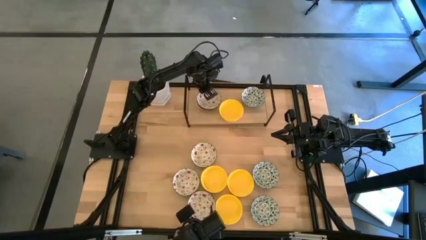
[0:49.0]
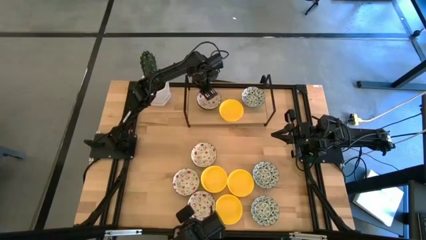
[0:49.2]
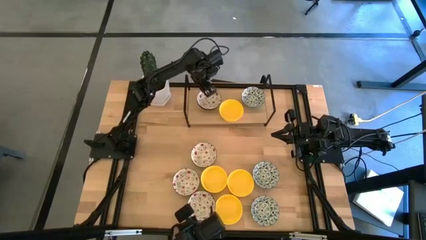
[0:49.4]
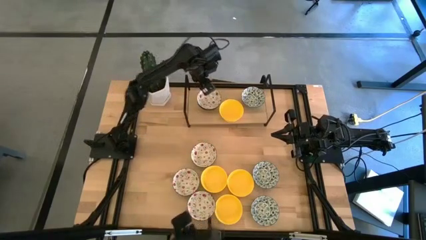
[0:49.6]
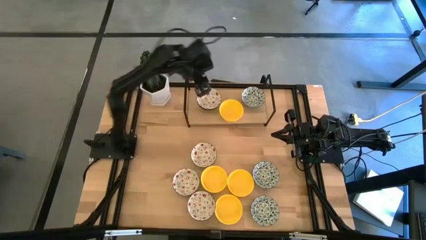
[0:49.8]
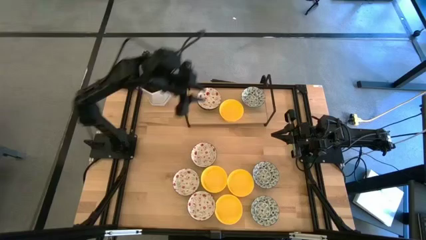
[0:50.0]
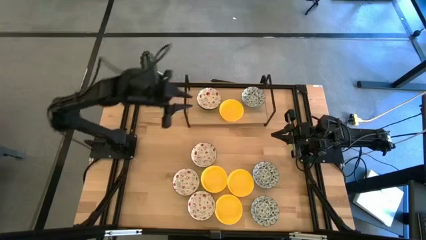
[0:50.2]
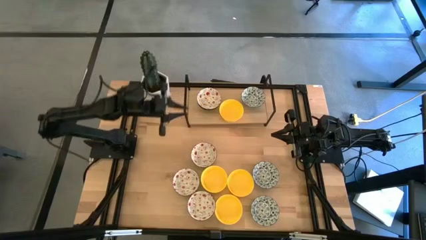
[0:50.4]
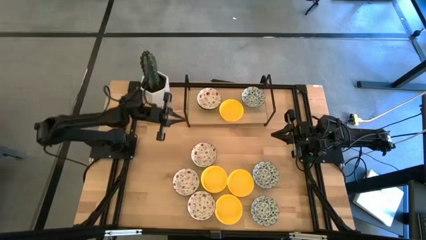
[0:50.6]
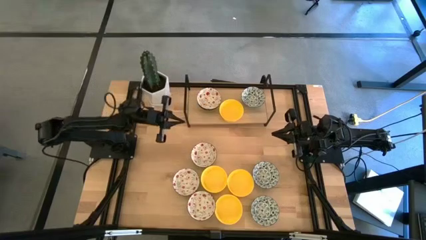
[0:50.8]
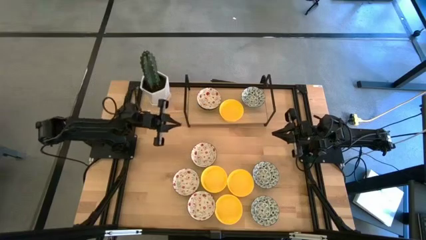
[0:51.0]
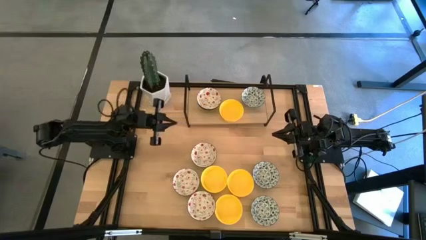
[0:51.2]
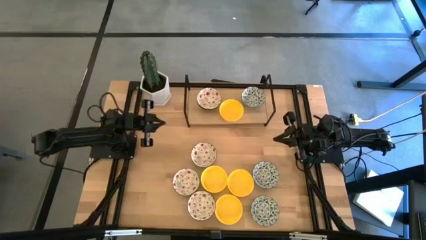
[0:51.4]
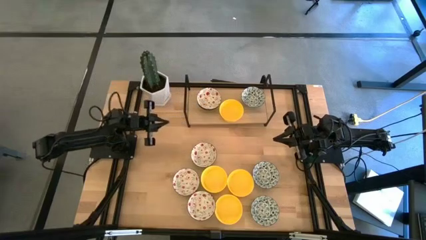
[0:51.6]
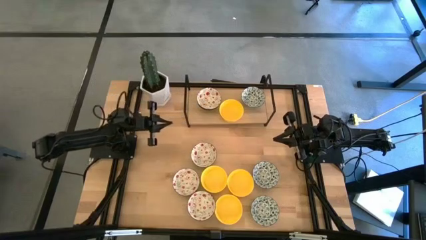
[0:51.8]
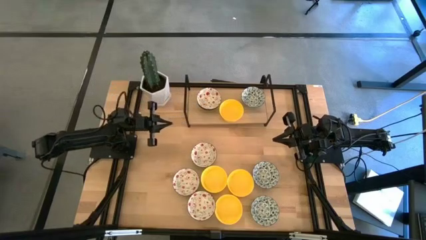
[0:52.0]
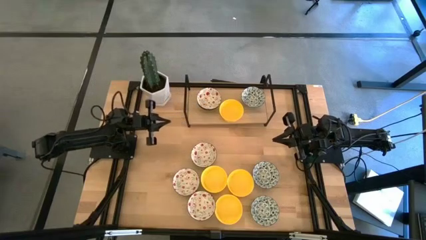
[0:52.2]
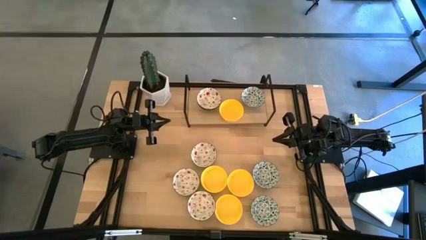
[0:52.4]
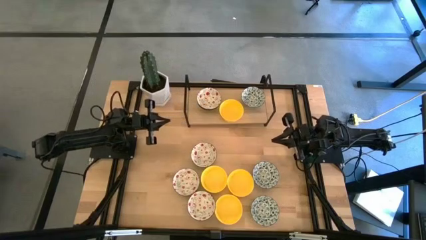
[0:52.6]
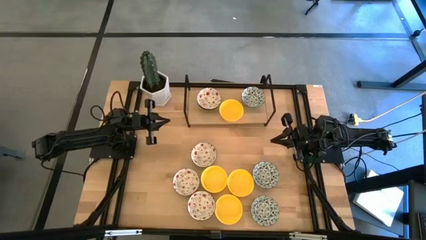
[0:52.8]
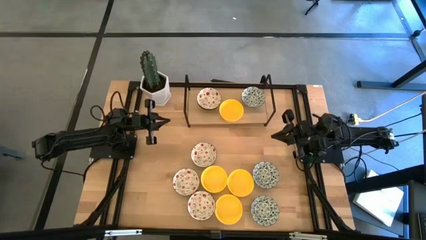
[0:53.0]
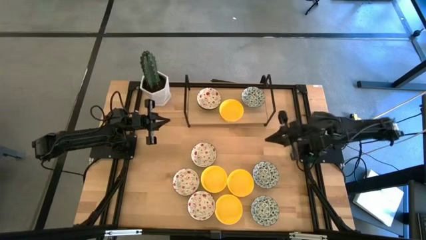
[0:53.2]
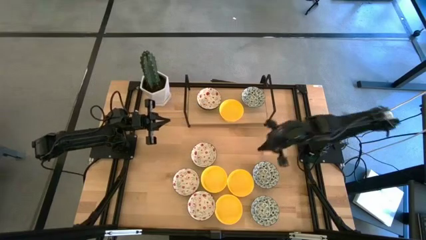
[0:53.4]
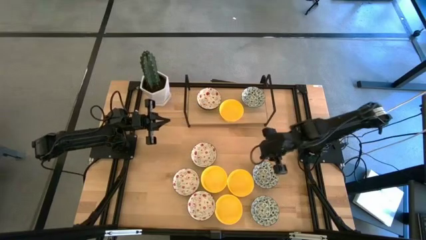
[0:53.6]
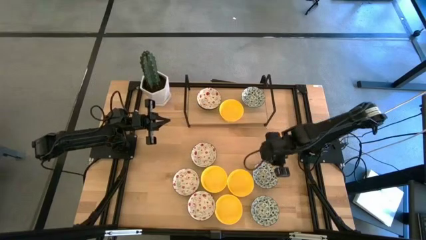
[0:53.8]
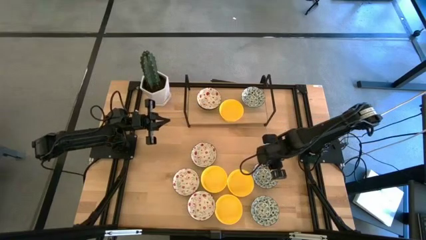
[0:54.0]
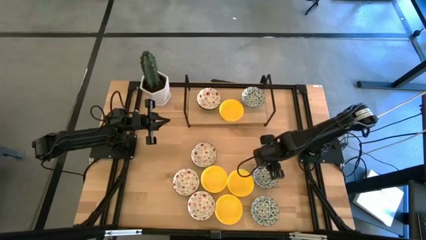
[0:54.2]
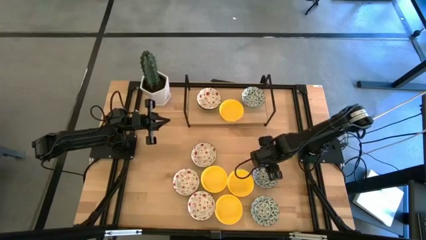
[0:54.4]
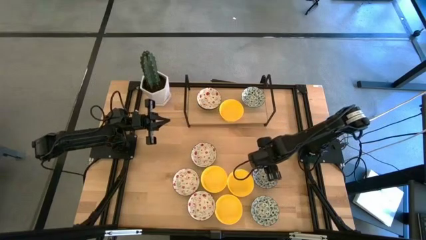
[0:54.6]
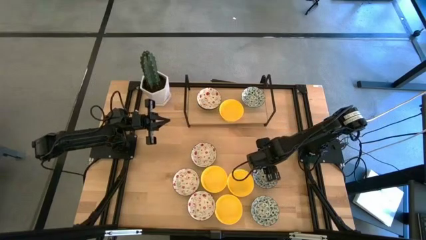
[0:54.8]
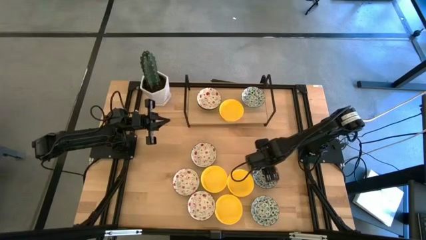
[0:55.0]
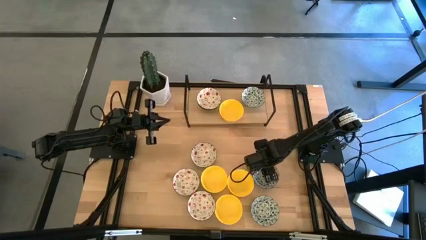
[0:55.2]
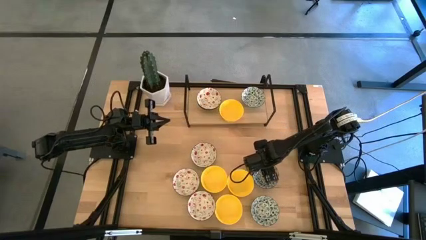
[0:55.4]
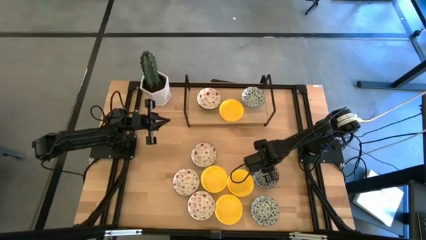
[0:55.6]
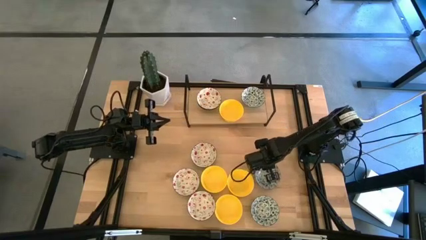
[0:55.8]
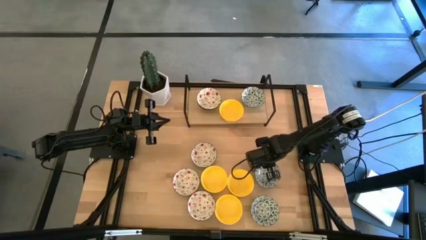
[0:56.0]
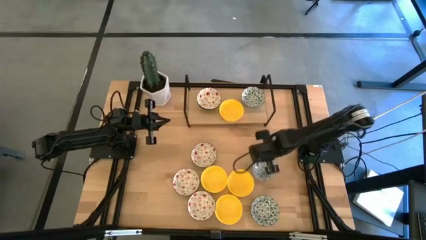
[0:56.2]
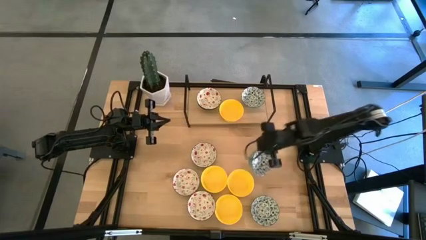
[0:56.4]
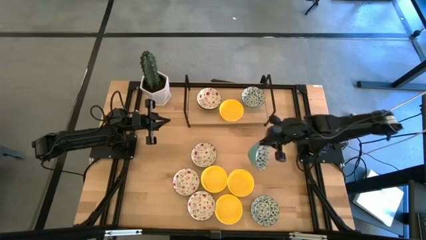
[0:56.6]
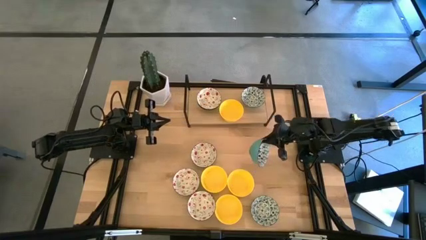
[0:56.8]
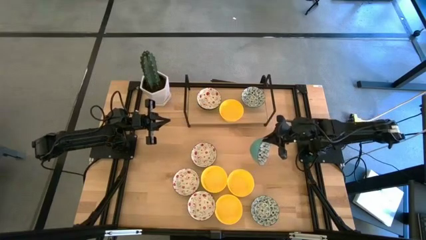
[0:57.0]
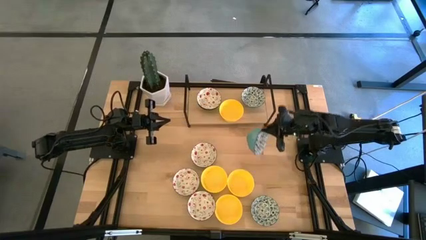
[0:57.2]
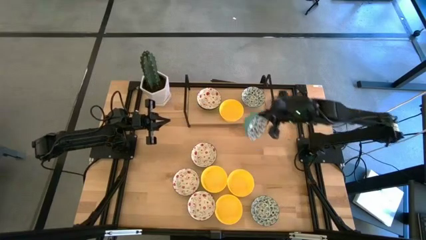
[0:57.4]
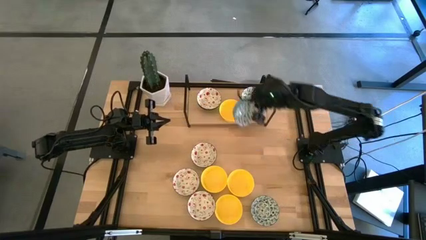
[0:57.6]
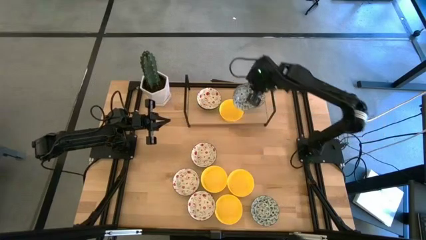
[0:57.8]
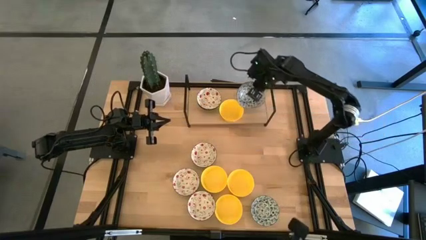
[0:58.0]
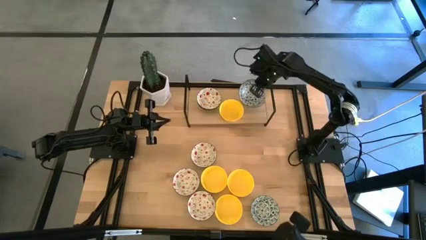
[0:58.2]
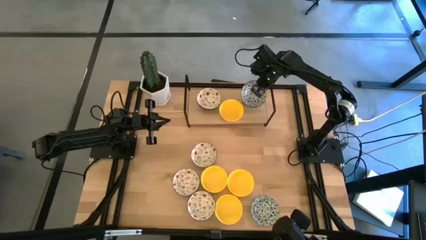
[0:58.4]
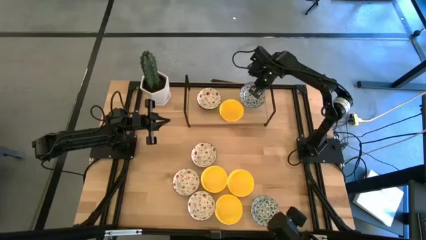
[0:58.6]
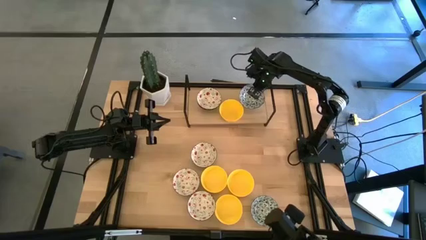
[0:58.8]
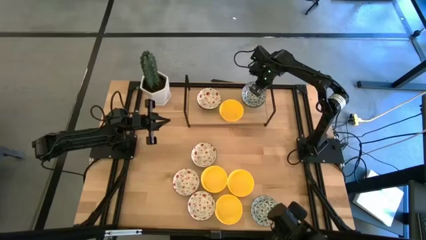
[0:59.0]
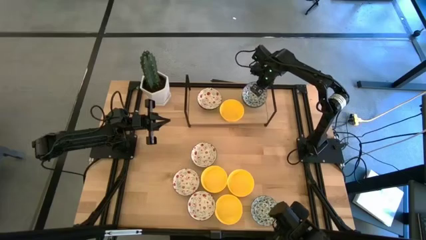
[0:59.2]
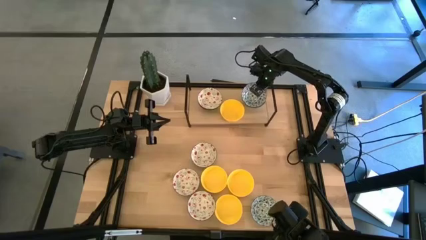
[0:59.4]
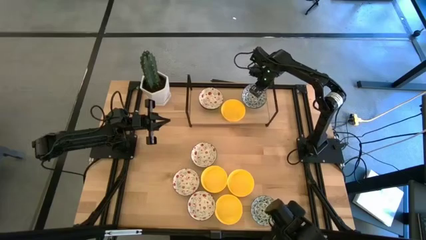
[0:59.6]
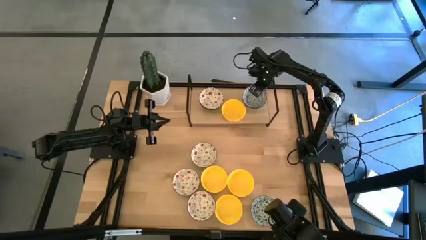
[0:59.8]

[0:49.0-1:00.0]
Task: Pick & Place Mini bowls
Stack the blue bowl on top of the blue bowl on the shelf
